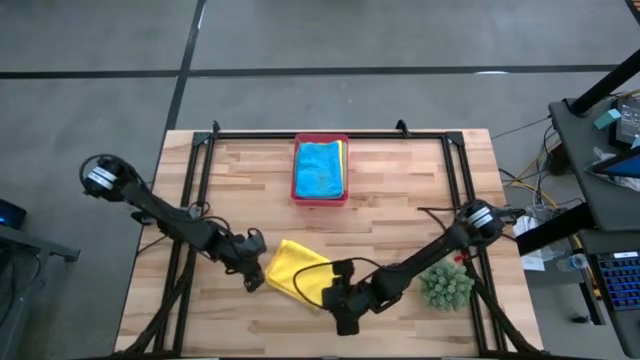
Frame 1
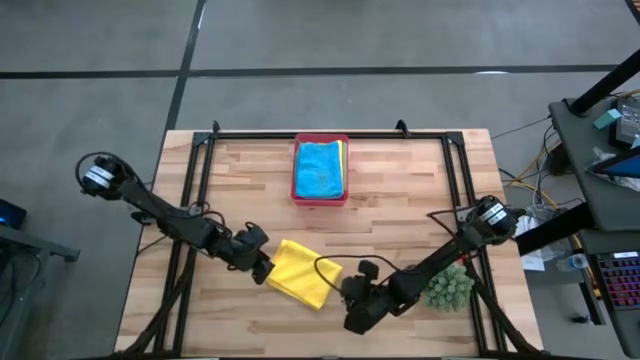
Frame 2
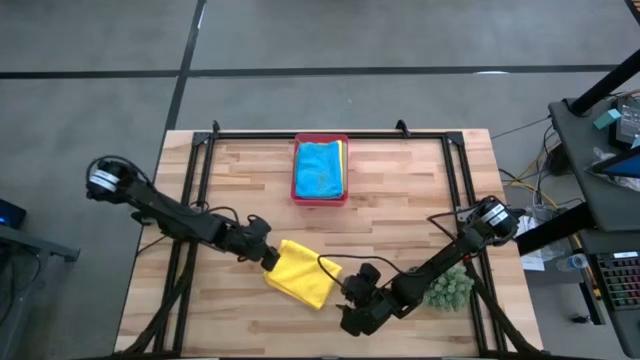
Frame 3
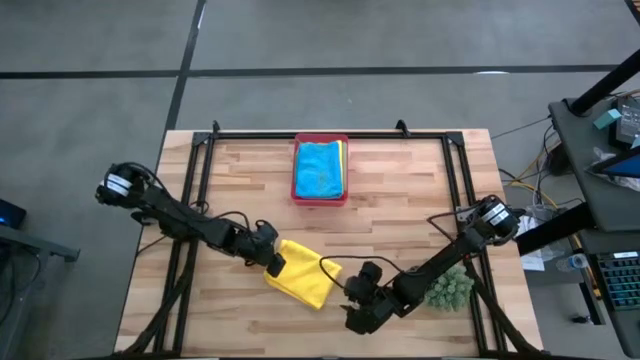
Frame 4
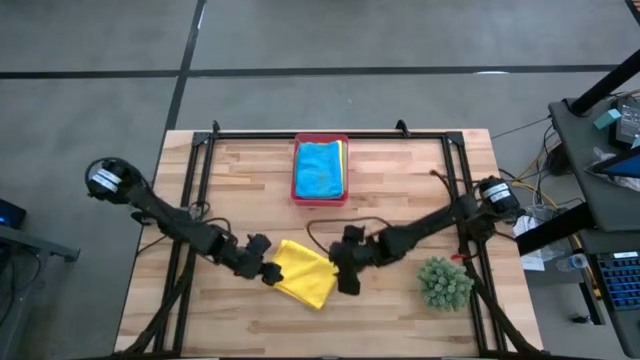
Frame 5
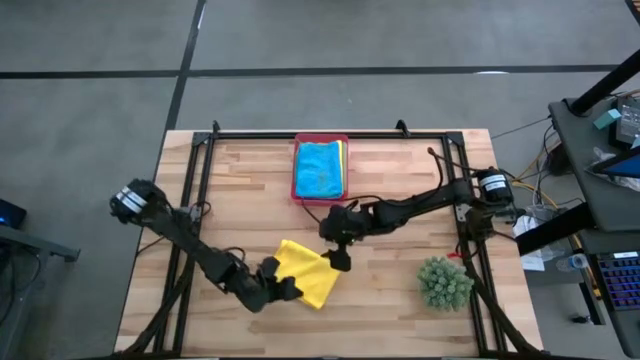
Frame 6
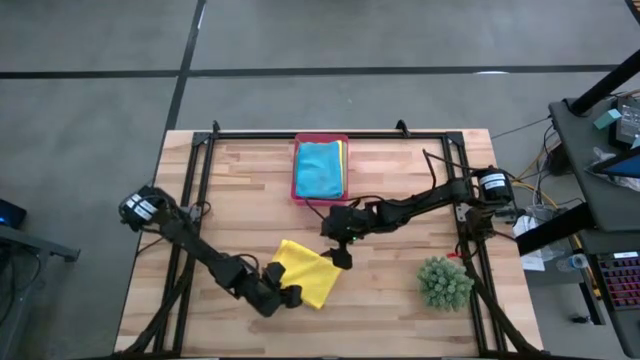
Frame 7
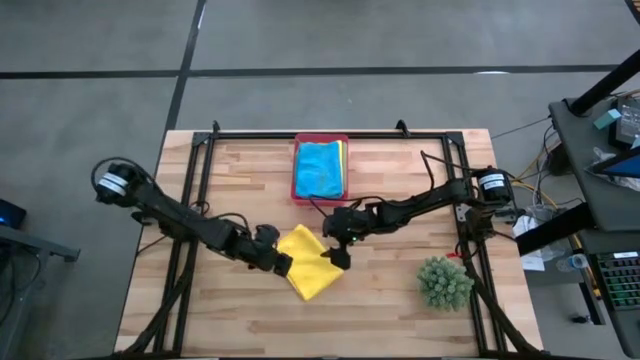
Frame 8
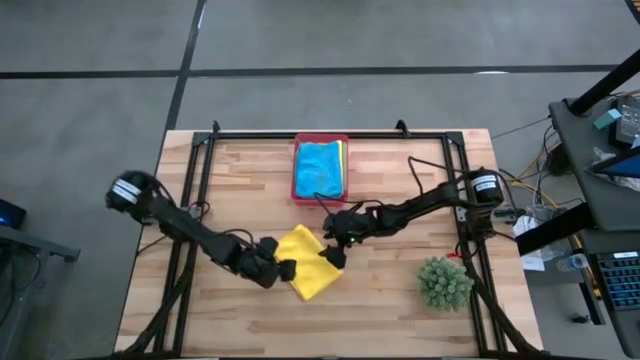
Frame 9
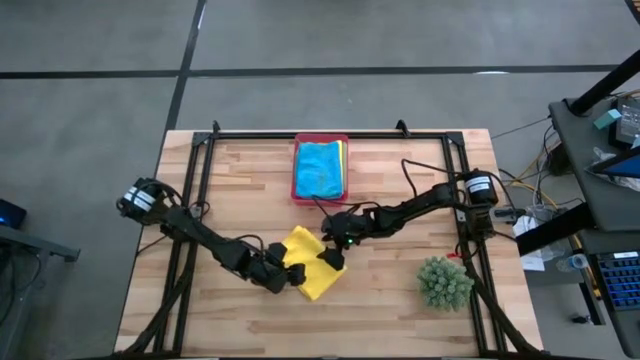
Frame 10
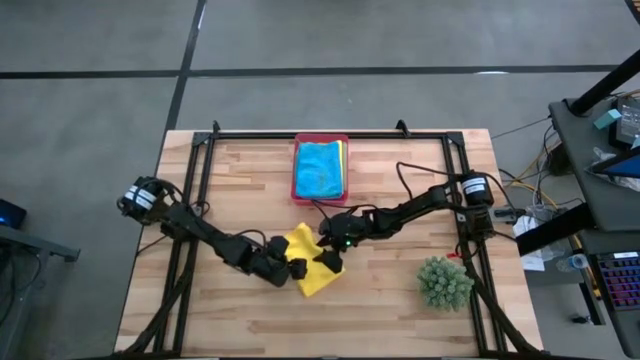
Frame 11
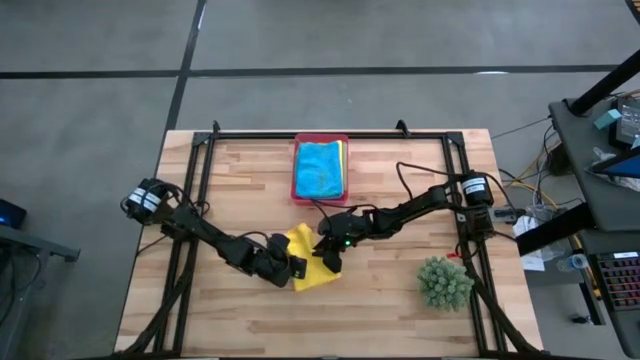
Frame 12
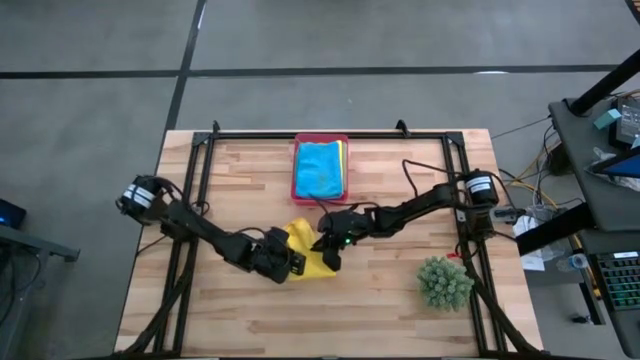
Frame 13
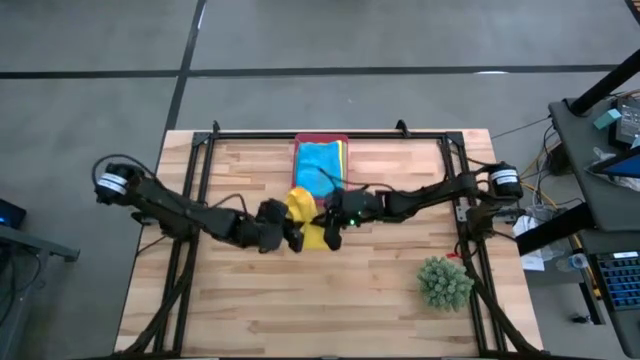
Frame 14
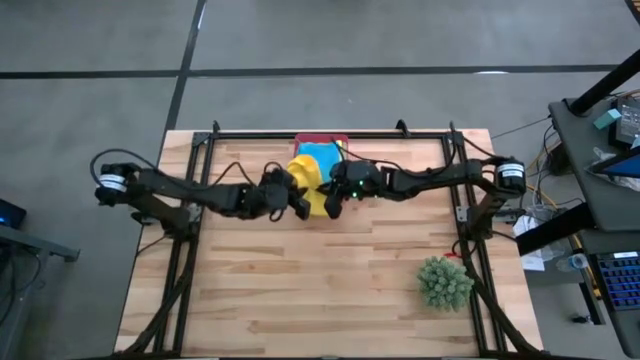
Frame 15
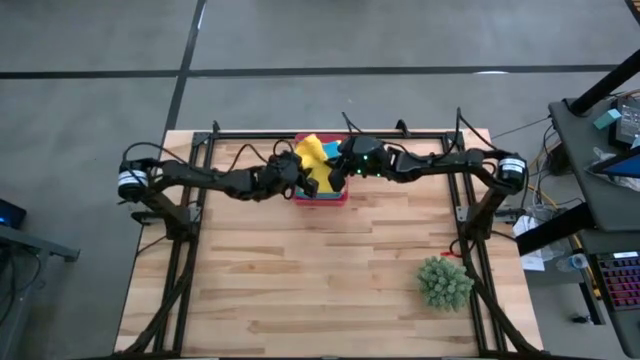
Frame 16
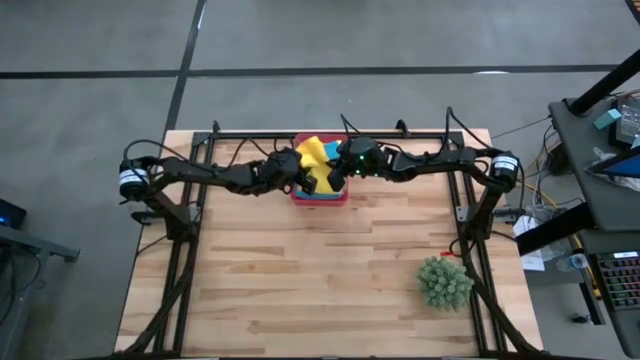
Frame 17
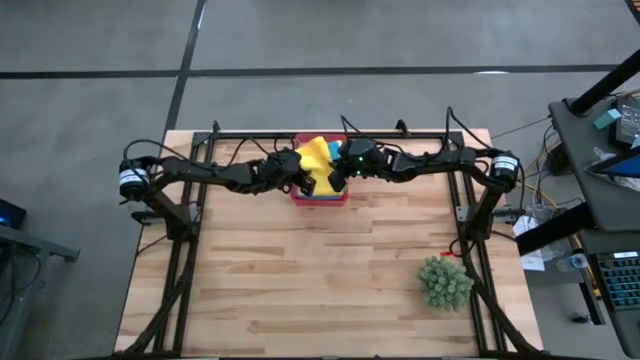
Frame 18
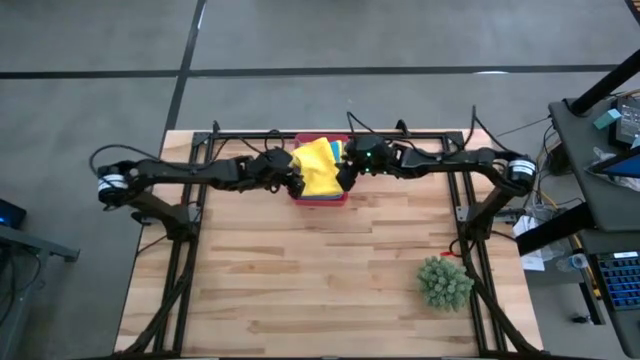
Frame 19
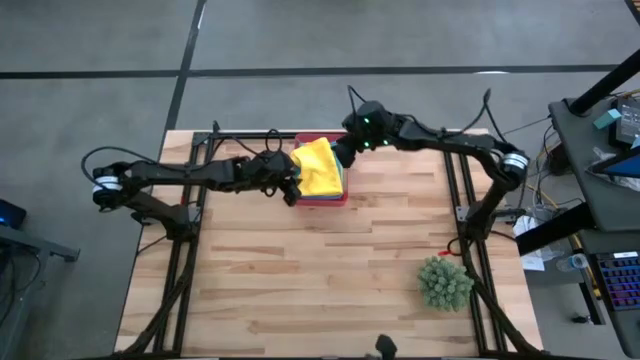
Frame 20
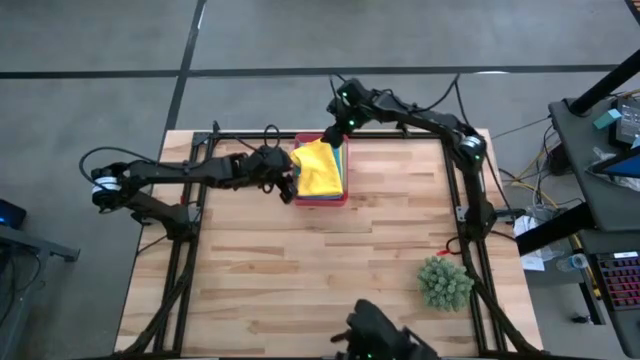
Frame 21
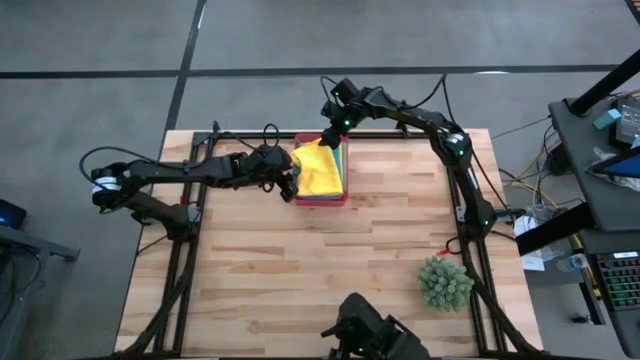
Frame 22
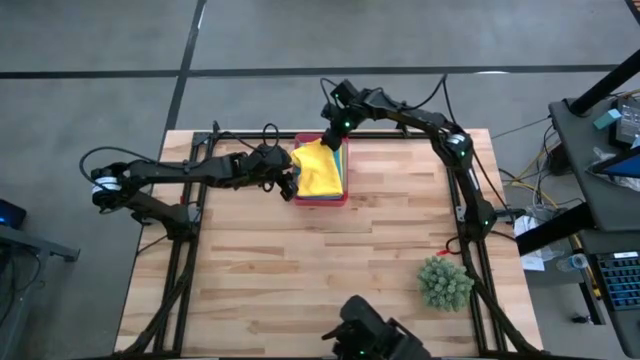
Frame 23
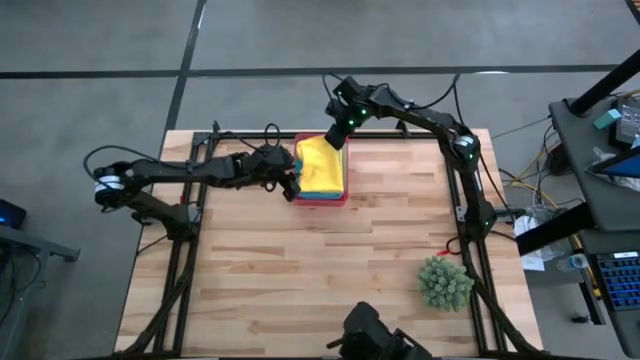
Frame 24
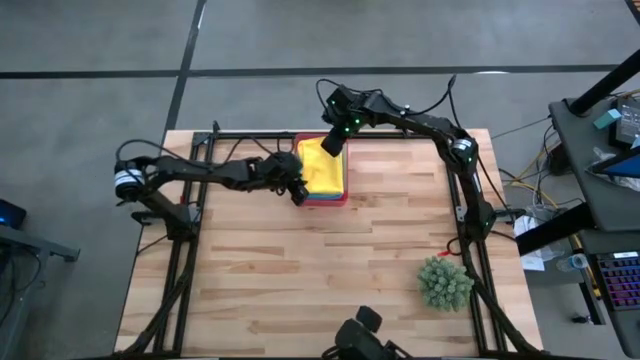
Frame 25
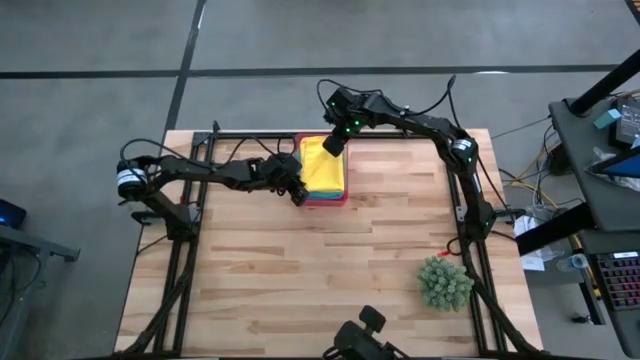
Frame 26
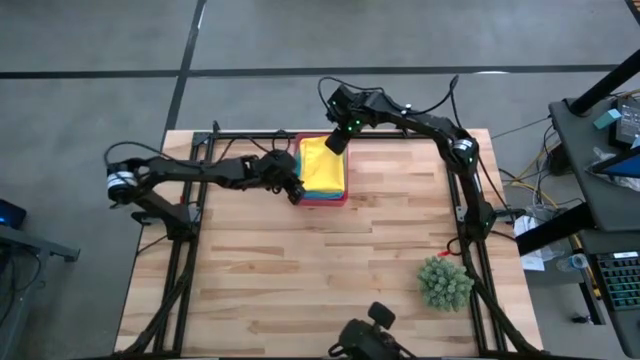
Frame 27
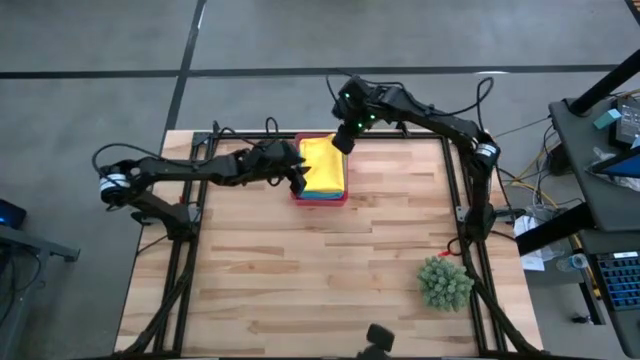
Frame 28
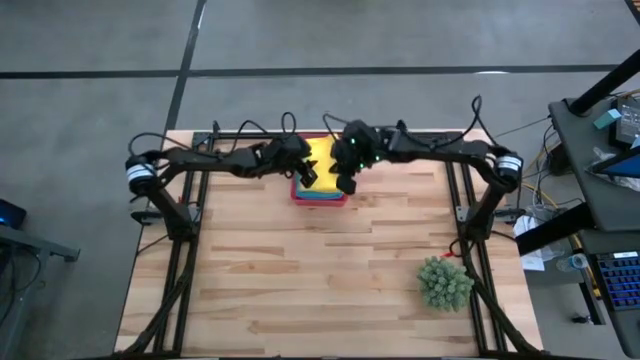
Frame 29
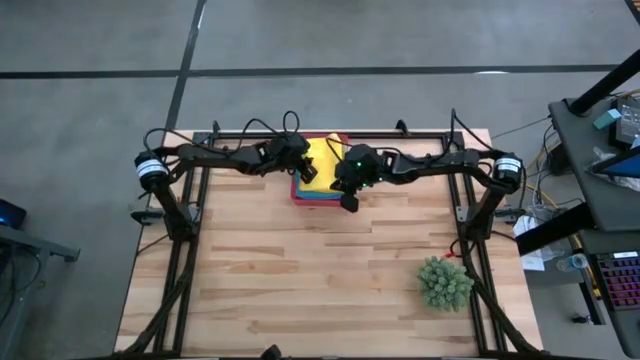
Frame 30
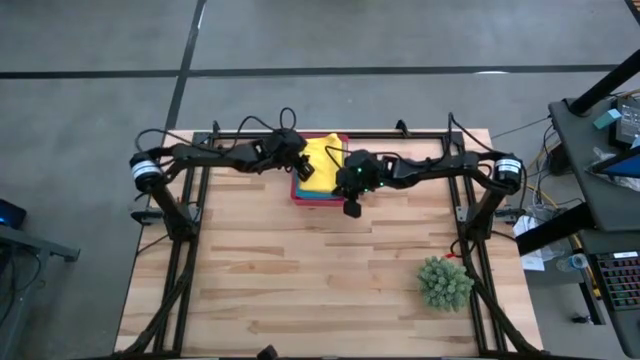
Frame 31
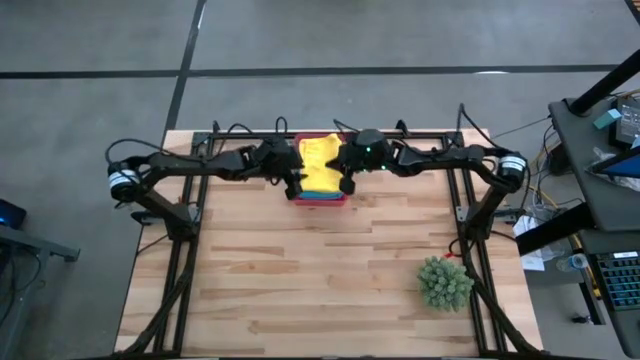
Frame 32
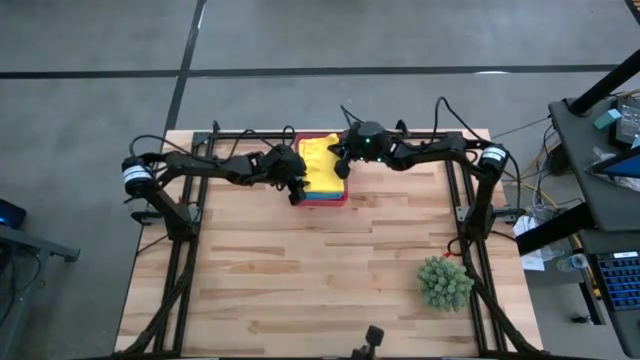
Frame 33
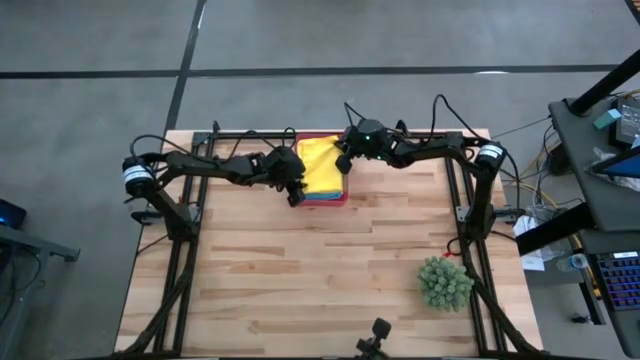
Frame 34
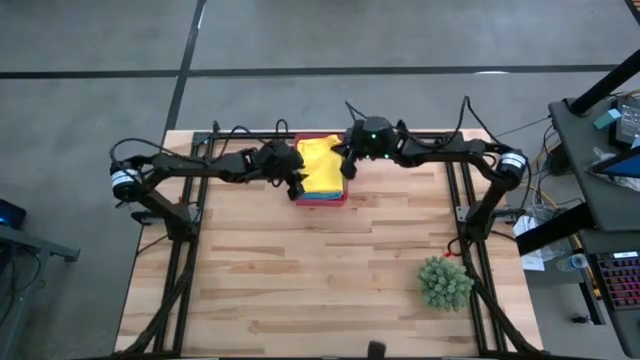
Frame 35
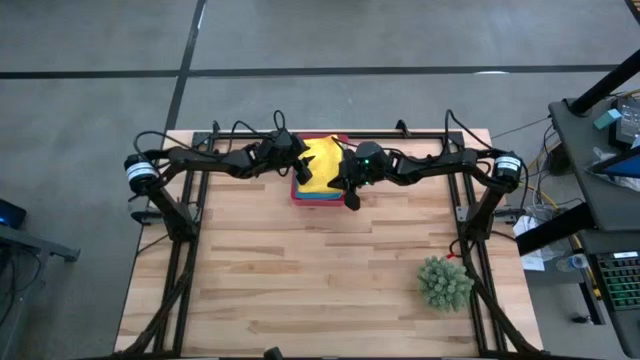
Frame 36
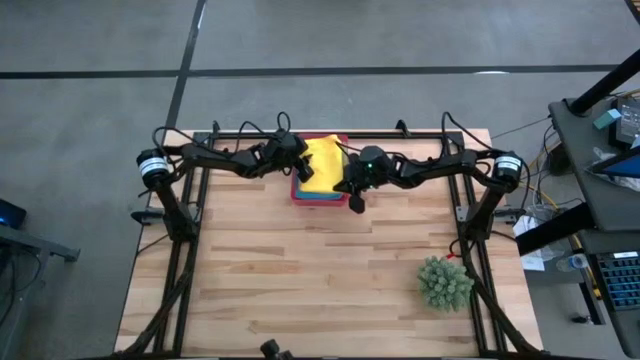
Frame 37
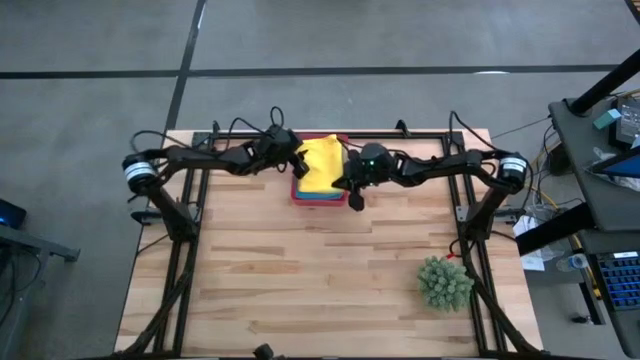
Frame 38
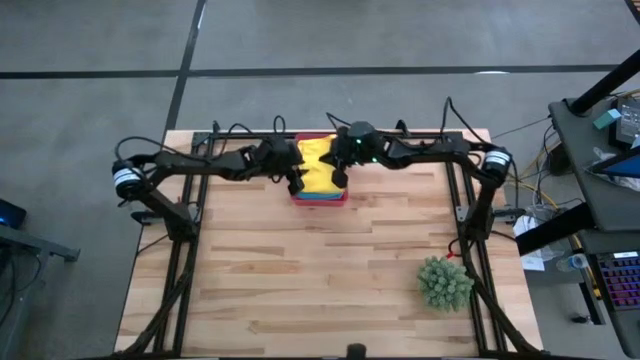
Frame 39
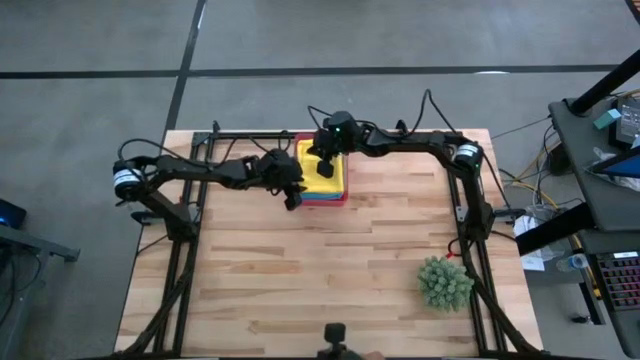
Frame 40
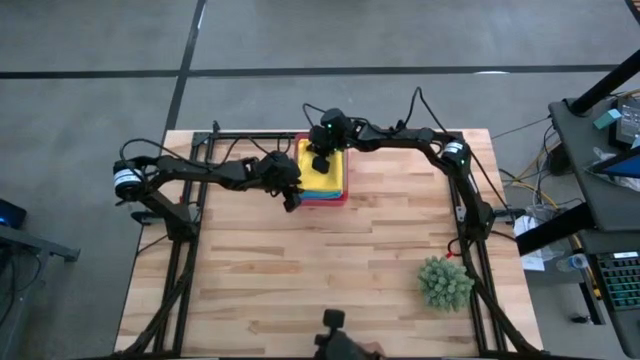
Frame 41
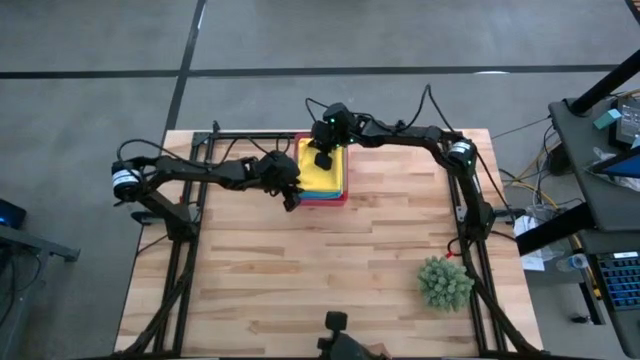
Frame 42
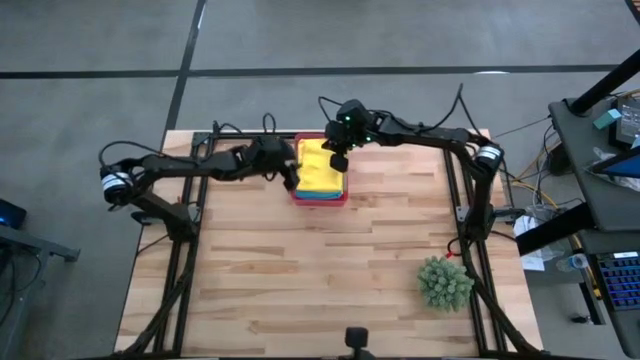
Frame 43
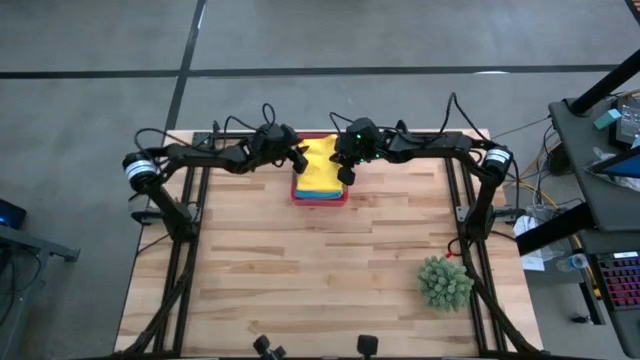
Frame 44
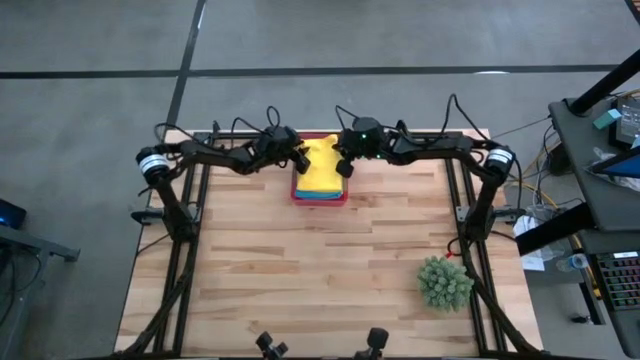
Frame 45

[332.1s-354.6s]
Task: Fold microfiber towels
Put the yellow towel into the bin
